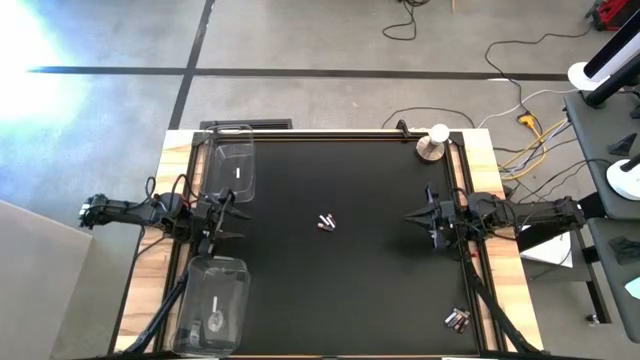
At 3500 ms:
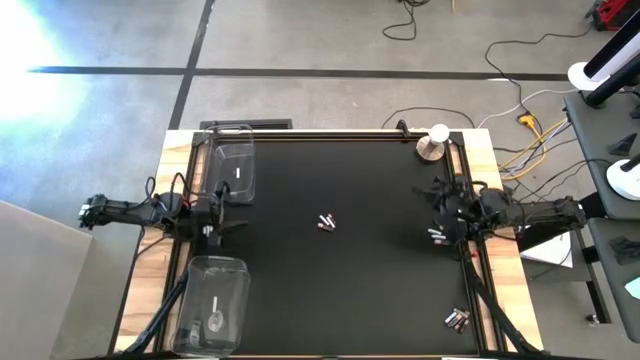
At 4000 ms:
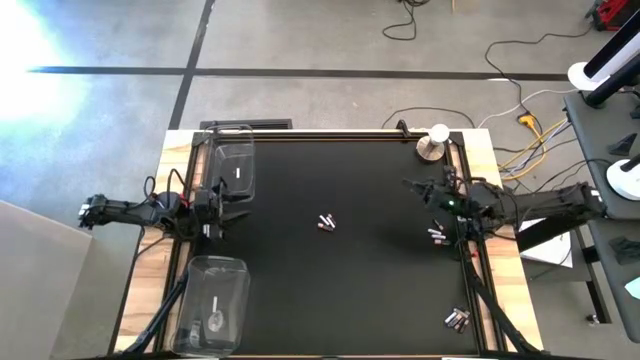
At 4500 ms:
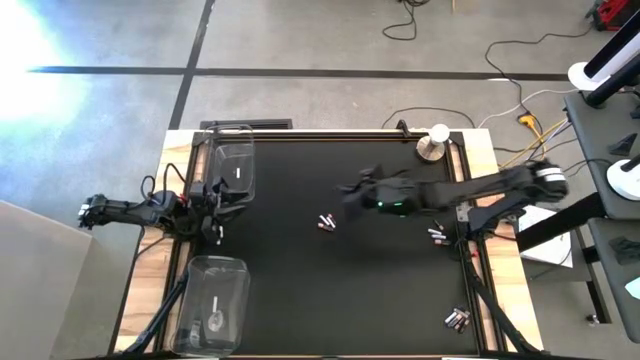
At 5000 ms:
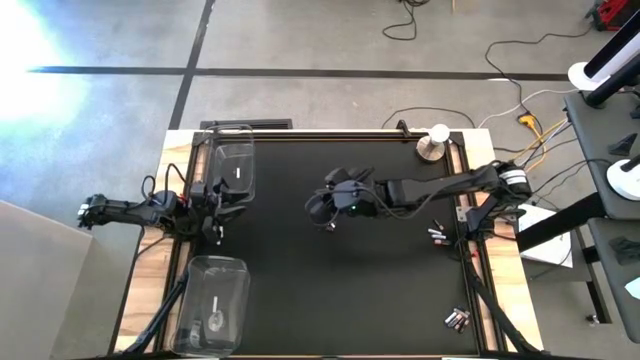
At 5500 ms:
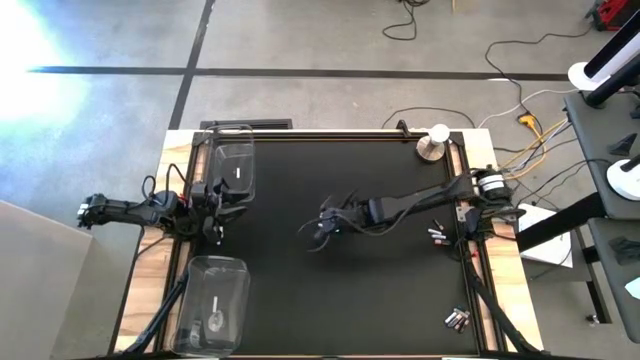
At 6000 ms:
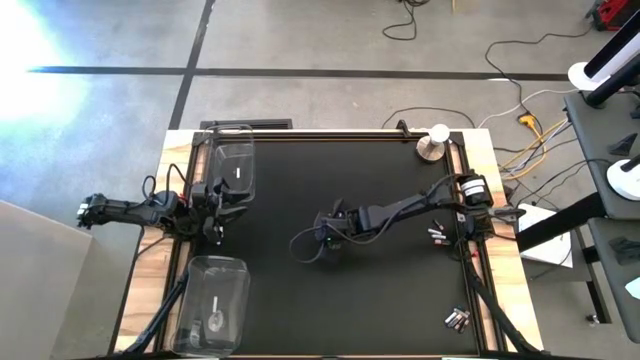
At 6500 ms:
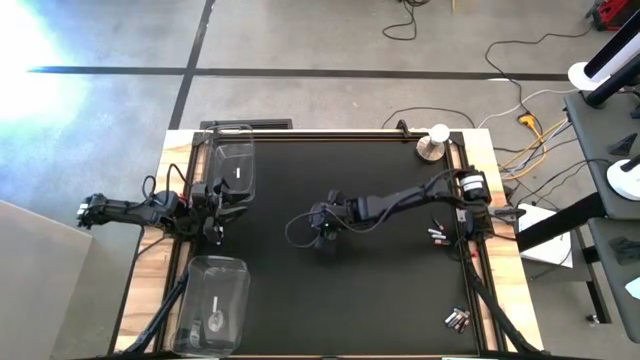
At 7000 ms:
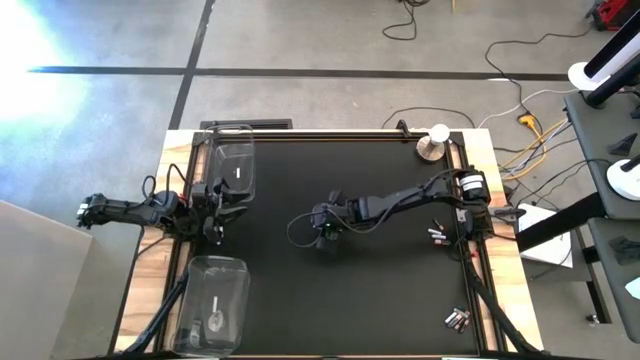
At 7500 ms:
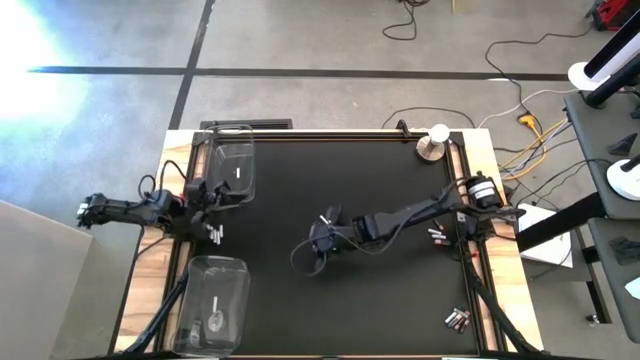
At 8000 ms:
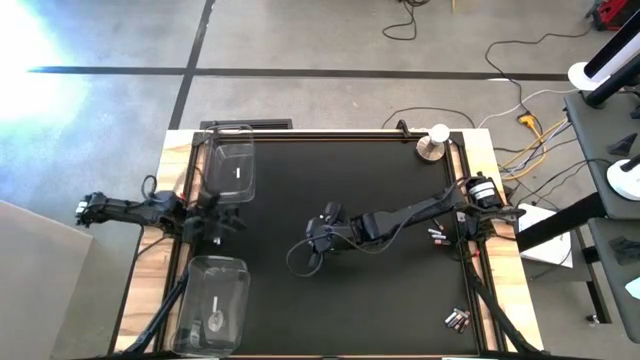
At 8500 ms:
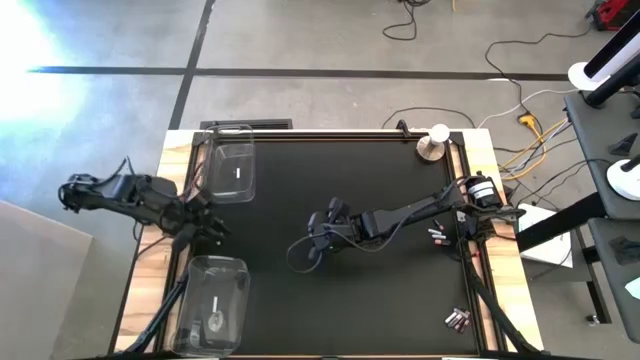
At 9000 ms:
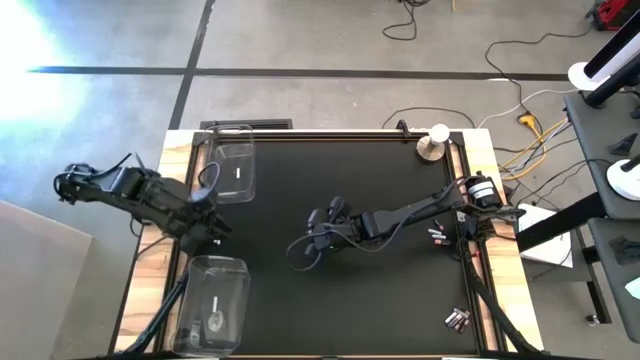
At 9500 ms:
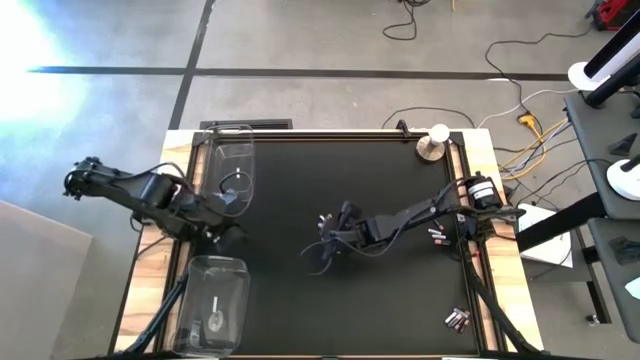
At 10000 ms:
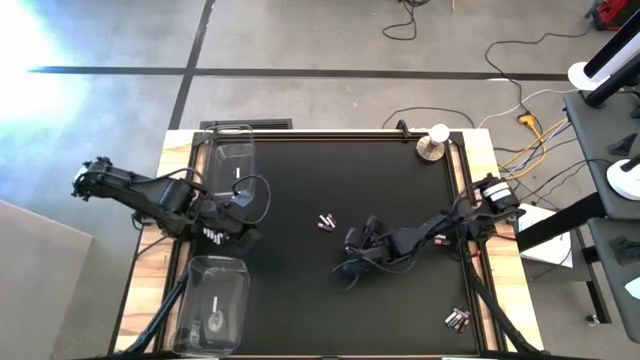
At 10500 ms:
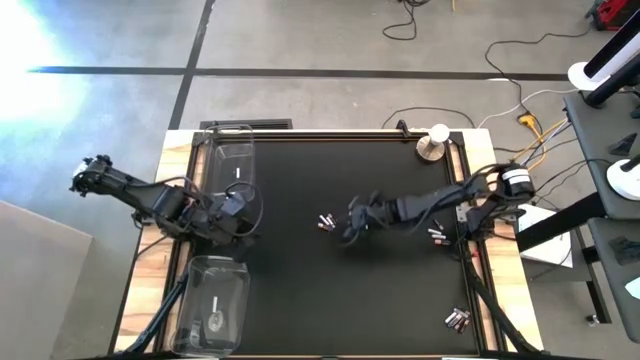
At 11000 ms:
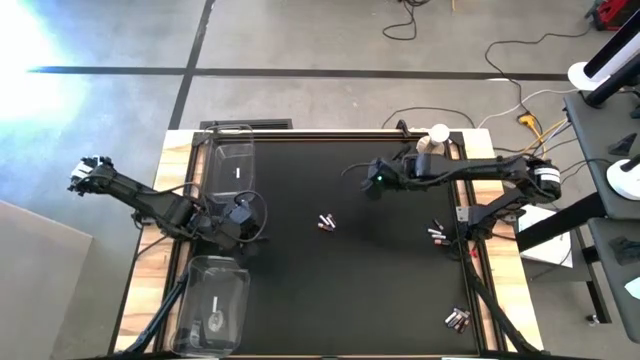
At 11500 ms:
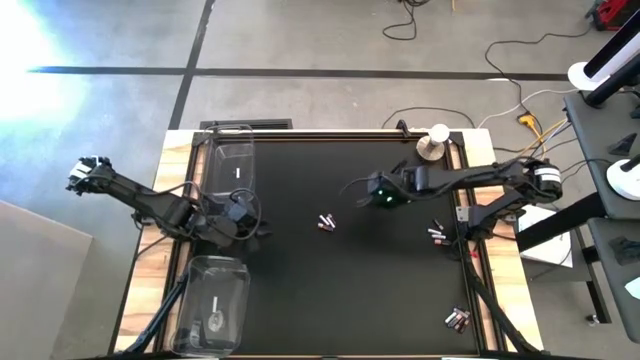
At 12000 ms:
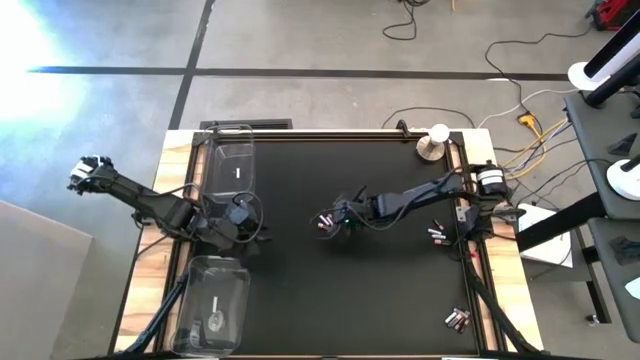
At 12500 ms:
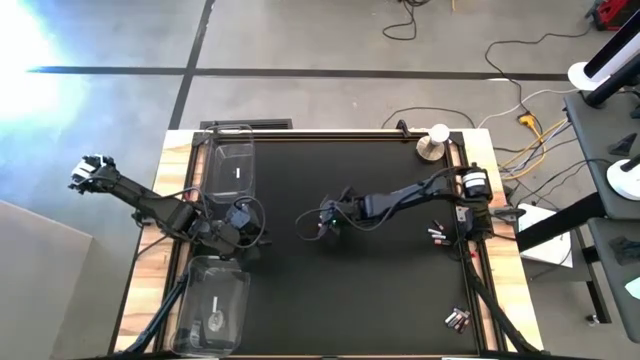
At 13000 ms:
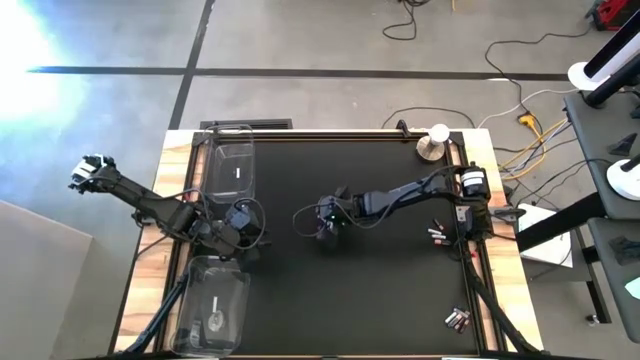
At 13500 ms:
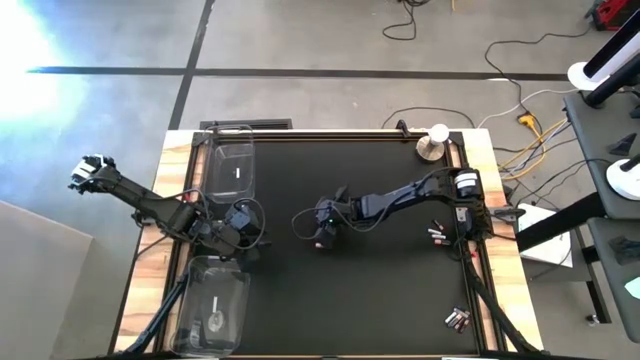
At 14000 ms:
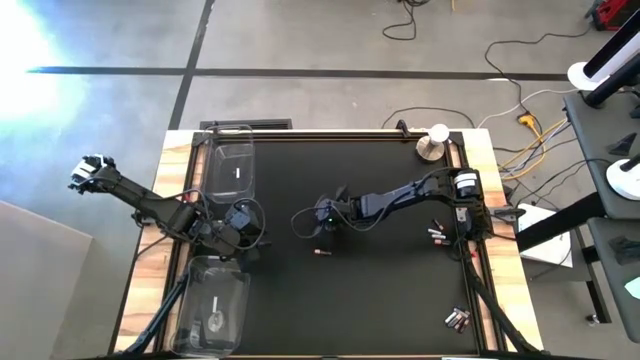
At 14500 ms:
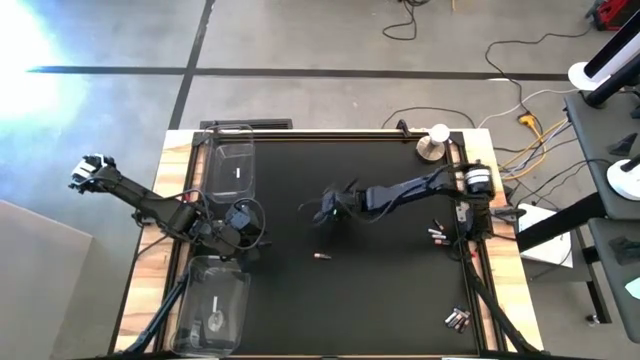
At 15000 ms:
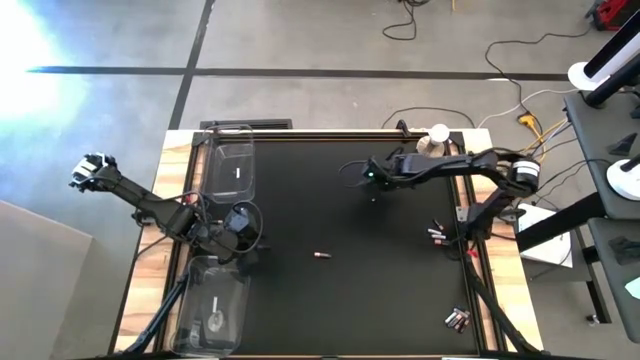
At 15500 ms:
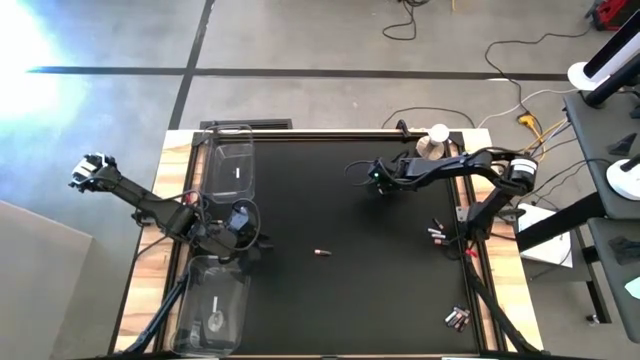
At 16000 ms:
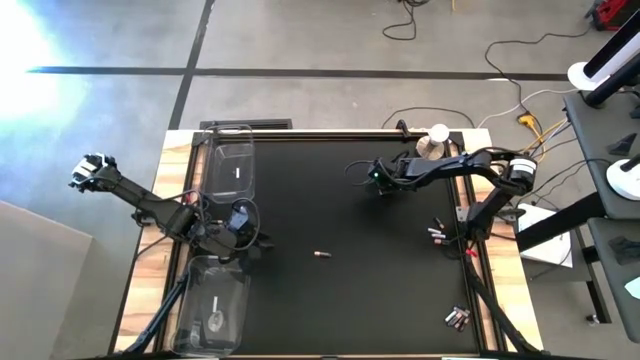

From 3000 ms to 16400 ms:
Task: Sort batteries
Move the white battery to the top right of the table

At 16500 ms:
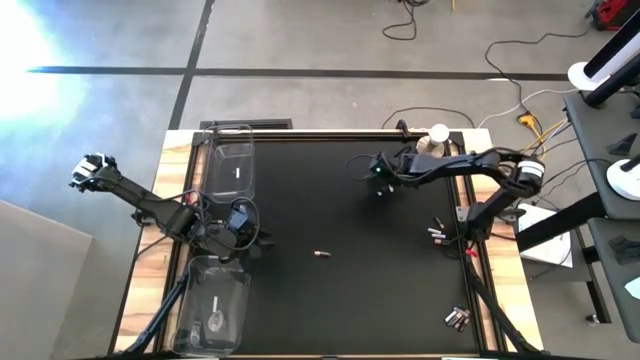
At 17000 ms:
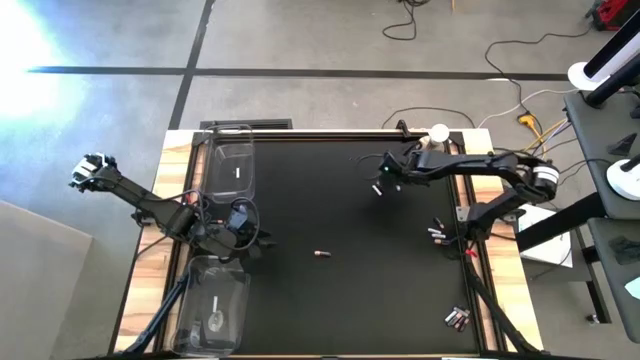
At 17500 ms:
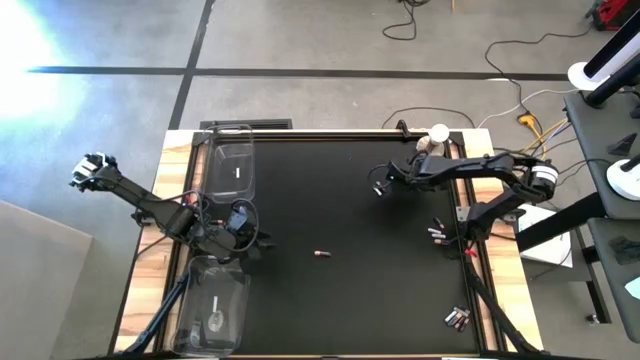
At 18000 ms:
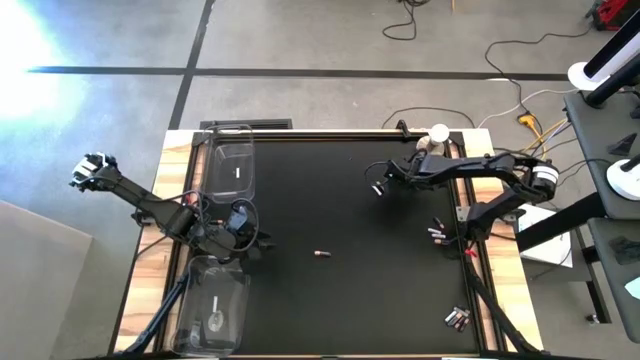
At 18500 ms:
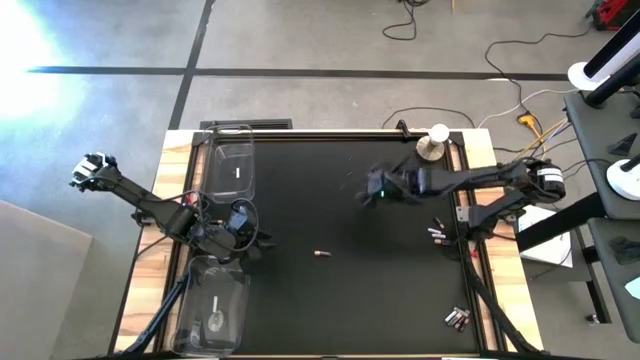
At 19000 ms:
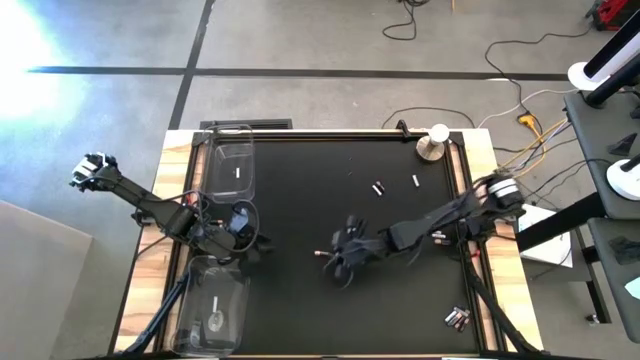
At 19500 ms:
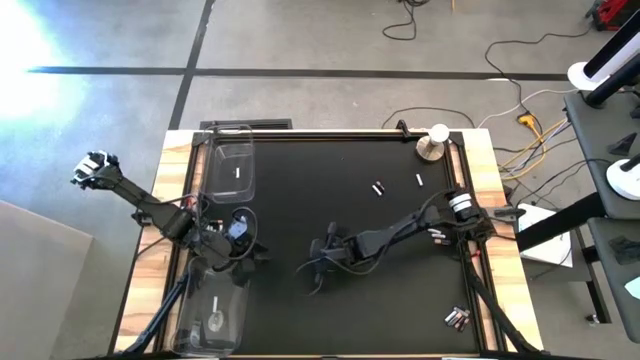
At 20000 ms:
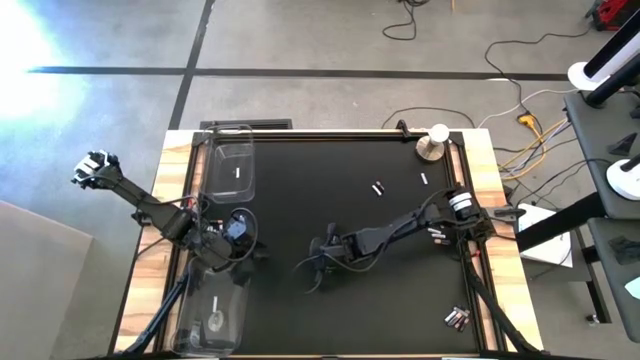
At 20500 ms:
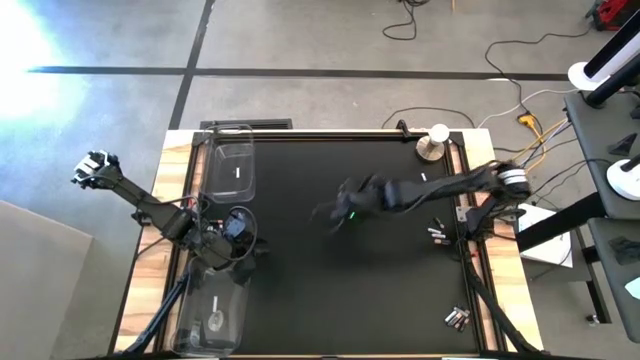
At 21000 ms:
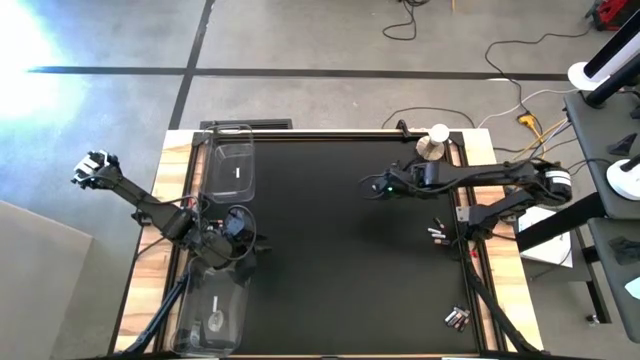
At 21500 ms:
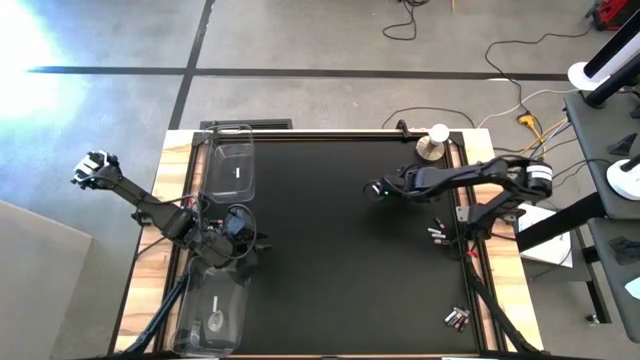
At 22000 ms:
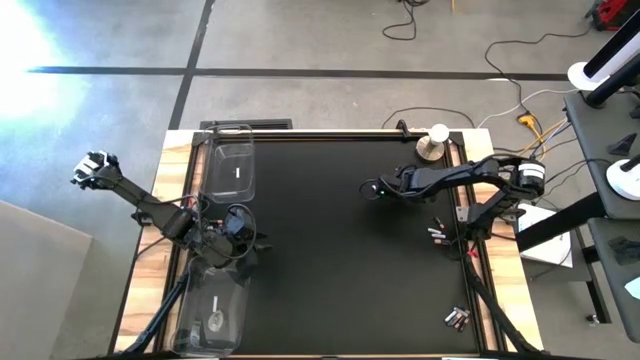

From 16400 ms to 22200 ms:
Move the black battery to the top right of the table

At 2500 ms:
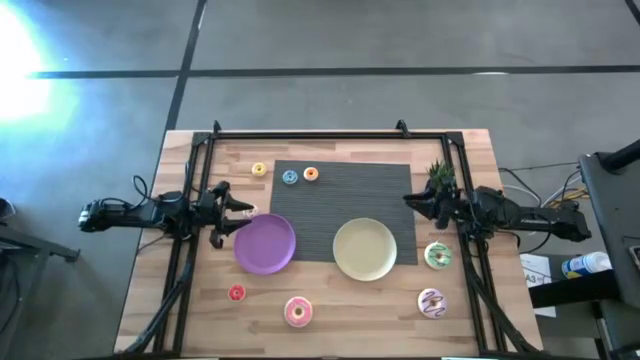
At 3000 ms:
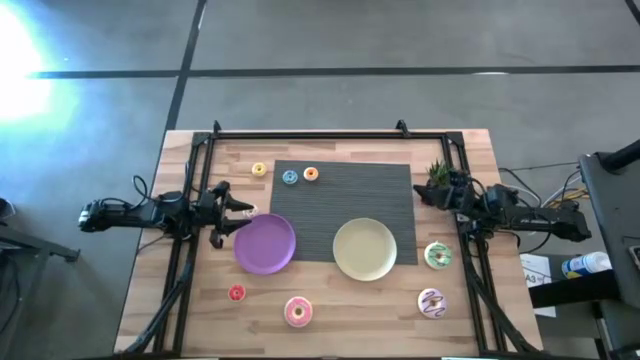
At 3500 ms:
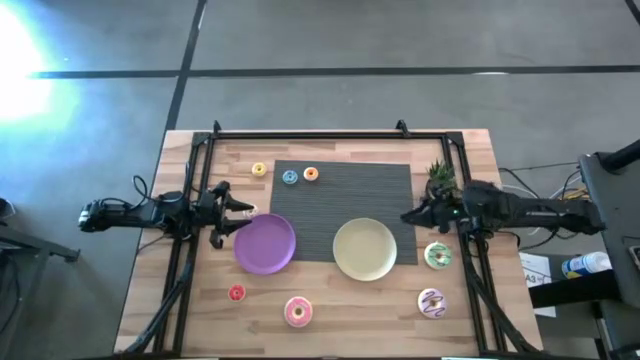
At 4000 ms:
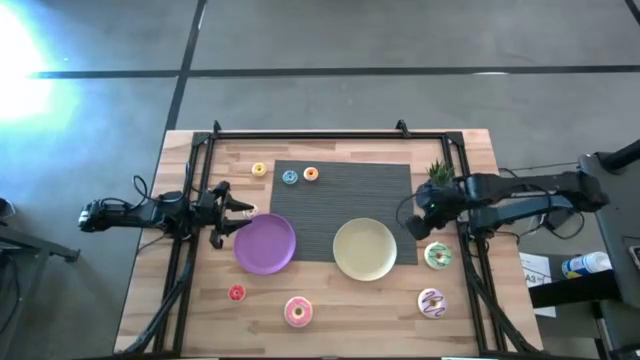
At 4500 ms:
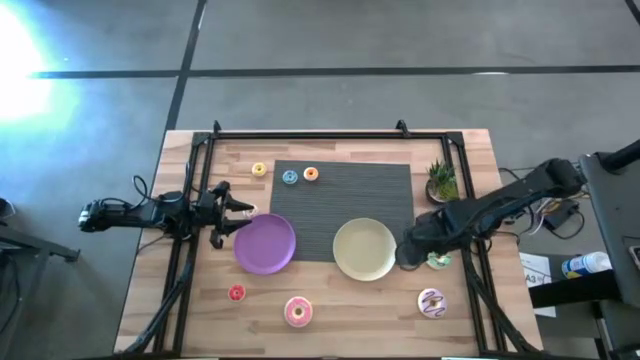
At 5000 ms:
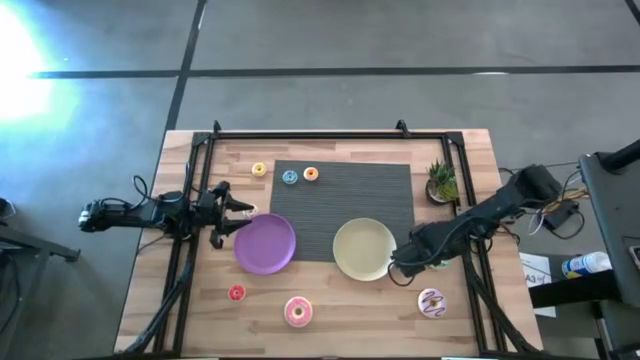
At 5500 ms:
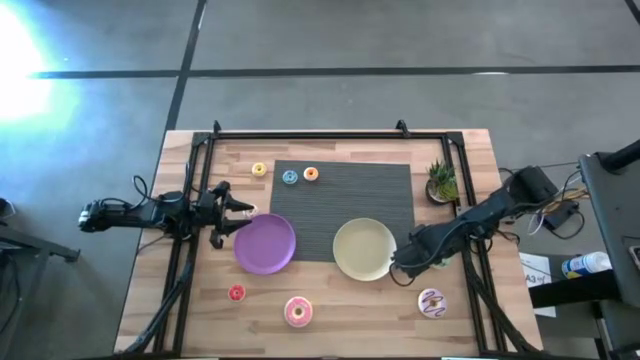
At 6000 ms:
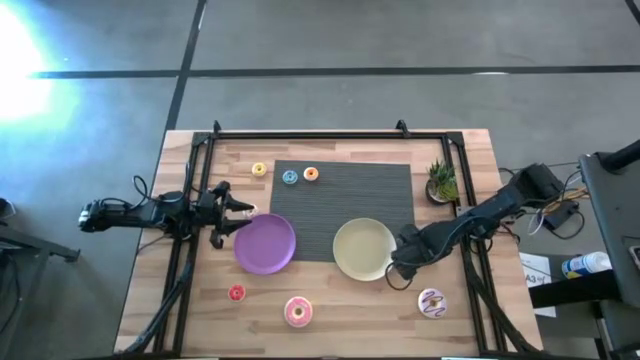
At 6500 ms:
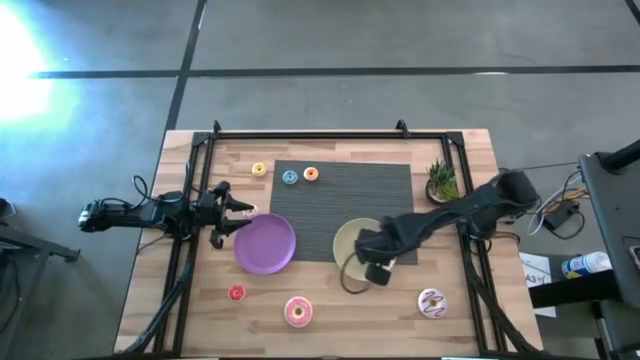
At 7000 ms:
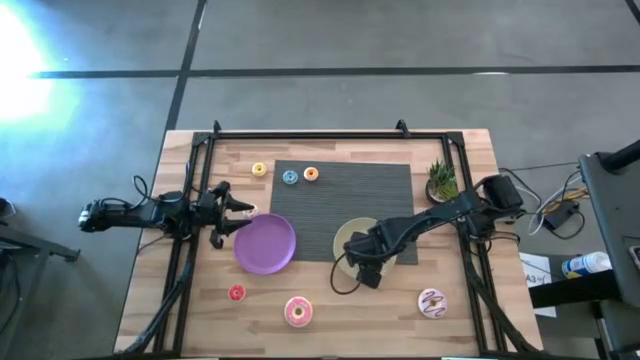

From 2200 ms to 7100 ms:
Task: Pick & Place donuts
Put the large light blue donut on the brown plate
